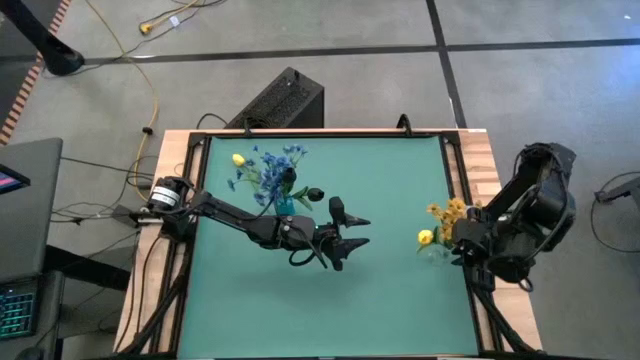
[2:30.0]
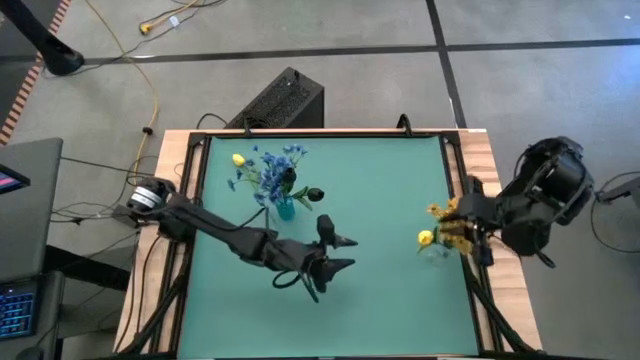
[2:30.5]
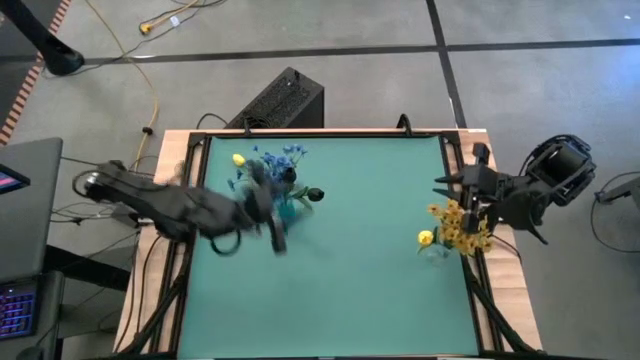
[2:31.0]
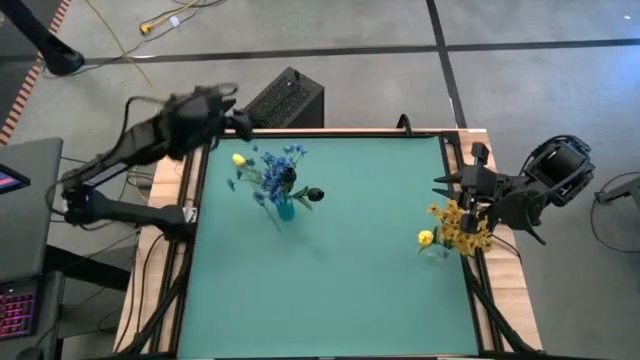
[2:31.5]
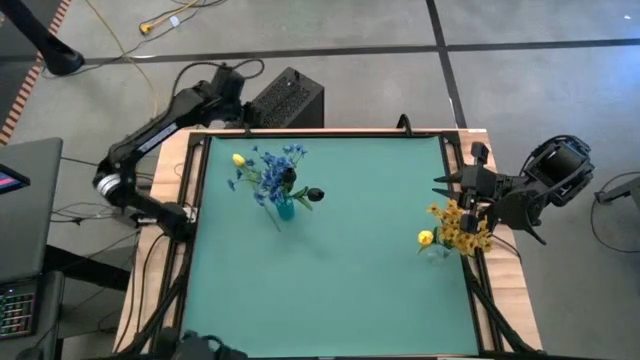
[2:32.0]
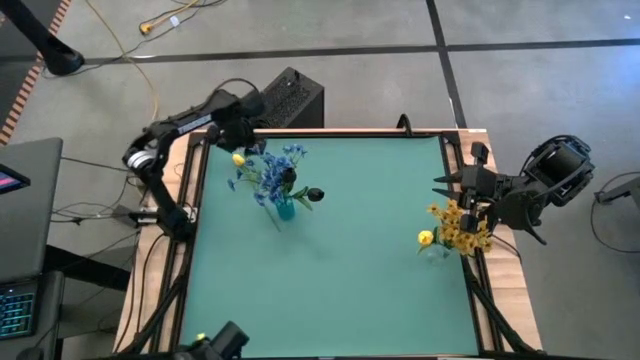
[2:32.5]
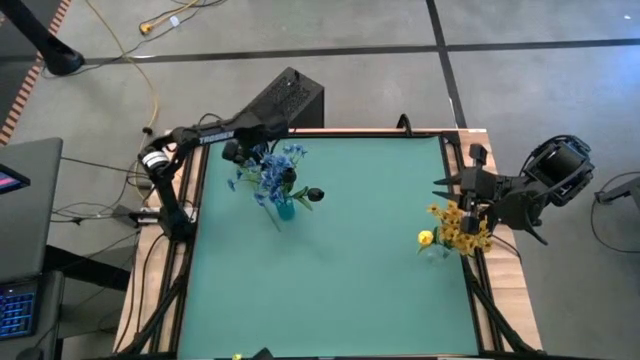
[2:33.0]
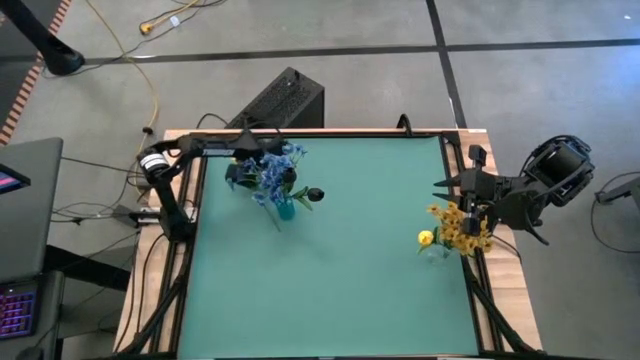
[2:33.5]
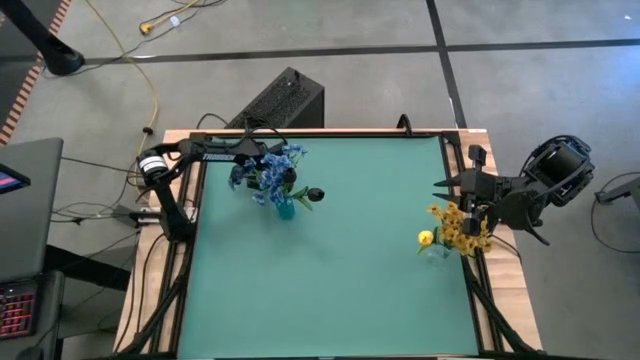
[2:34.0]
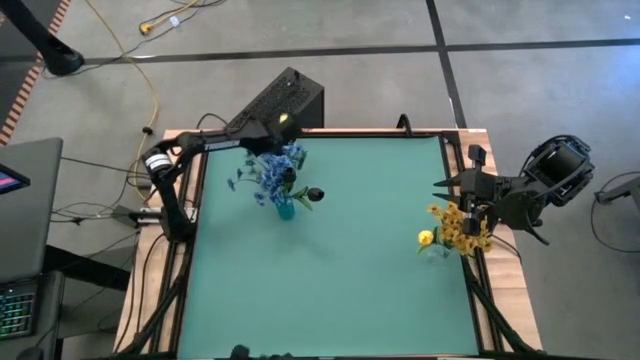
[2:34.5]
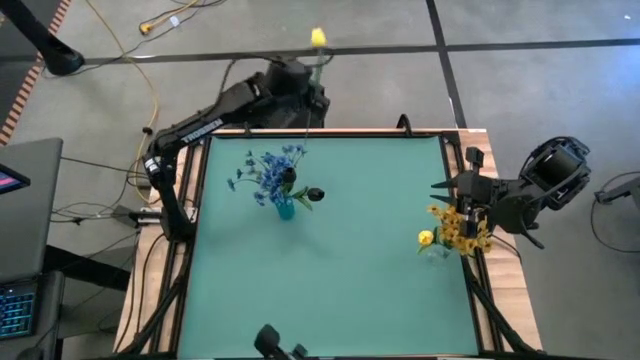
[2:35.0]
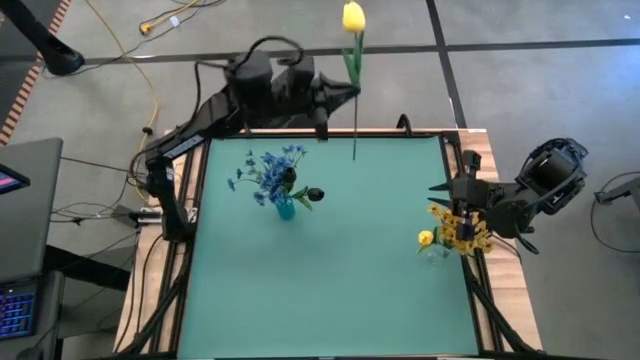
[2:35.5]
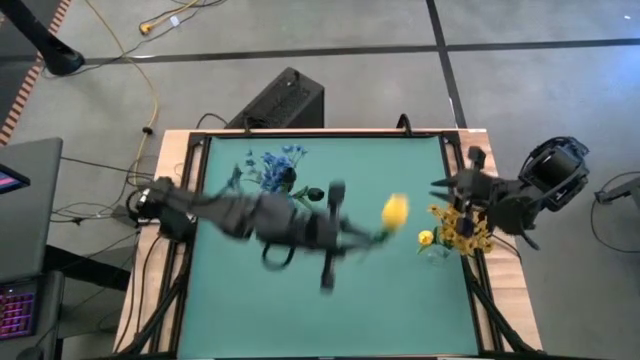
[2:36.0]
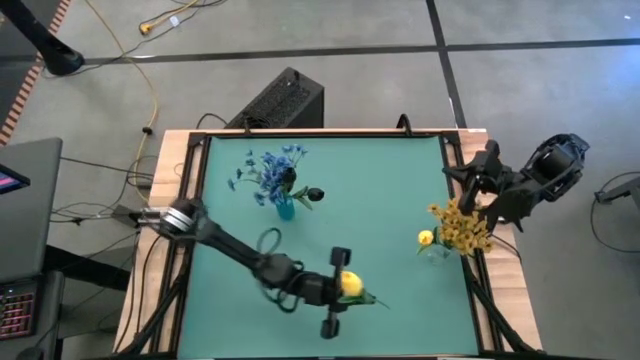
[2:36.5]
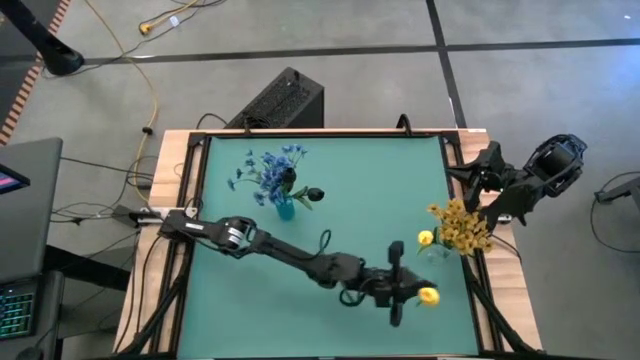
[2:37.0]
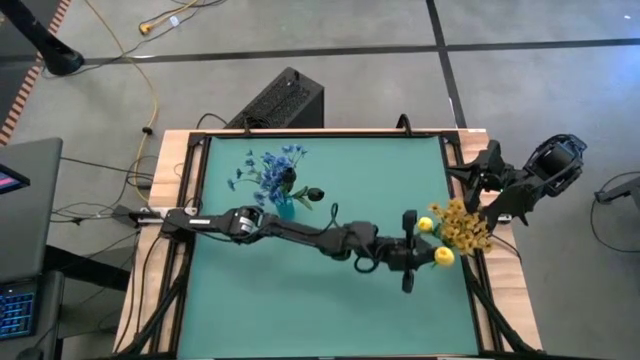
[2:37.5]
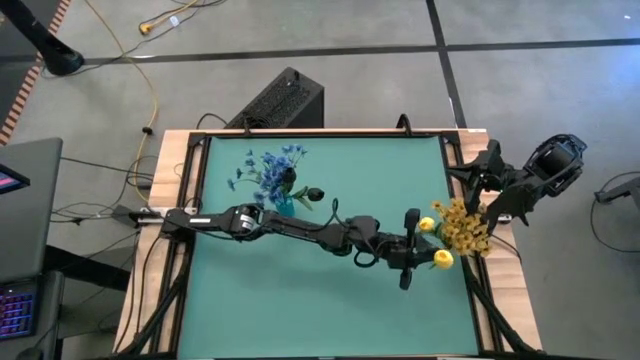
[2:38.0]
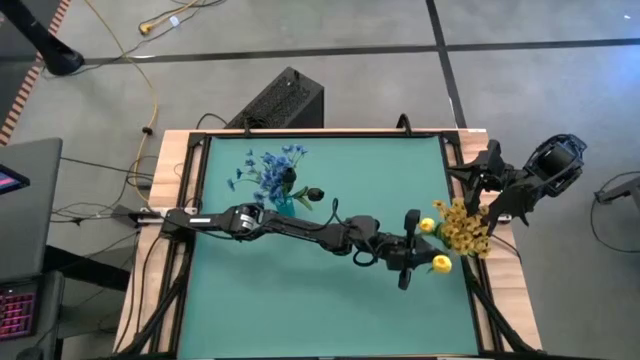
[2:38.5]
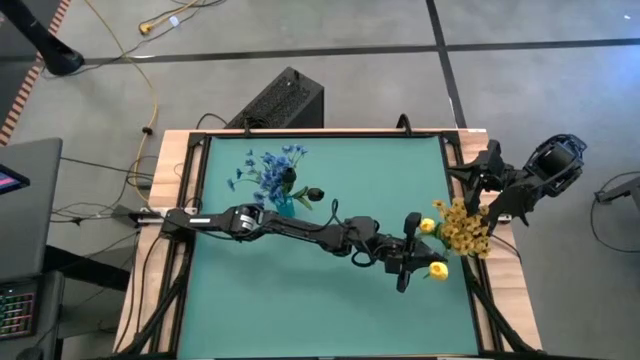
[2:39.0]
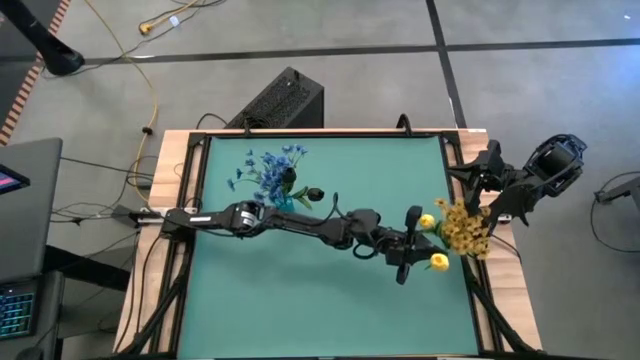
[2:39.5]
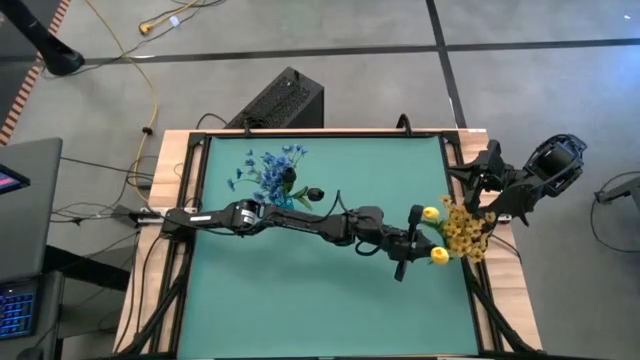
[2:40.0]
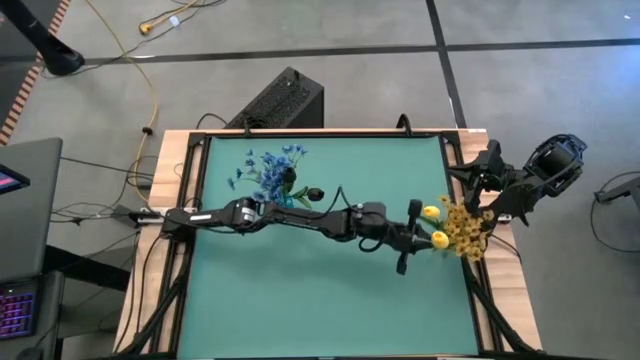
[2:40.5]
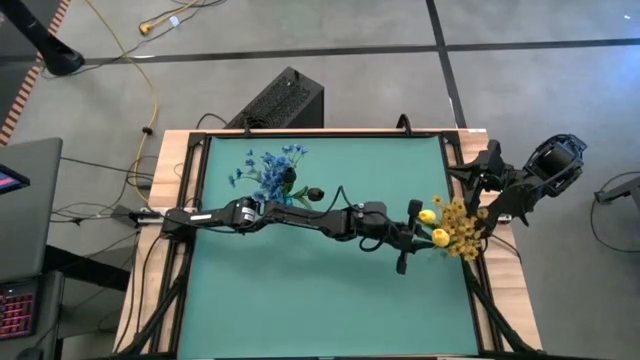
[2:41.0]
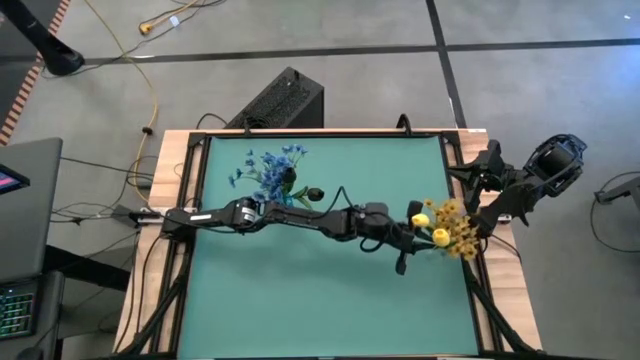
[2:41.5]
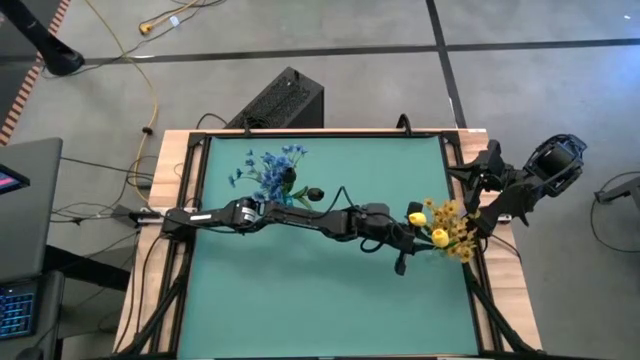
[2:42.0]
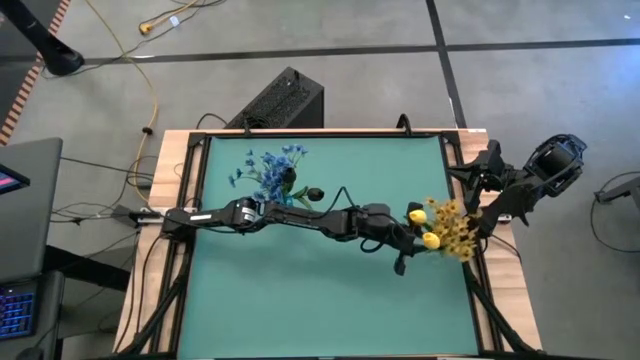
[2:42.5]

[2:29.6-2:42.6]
Task: Sort flowers into vase by color
Put the yellow flower into the transparent vase

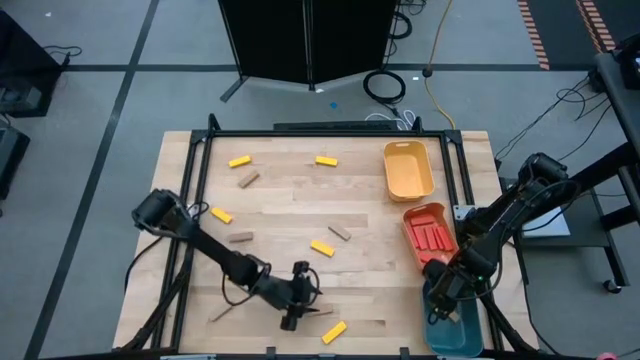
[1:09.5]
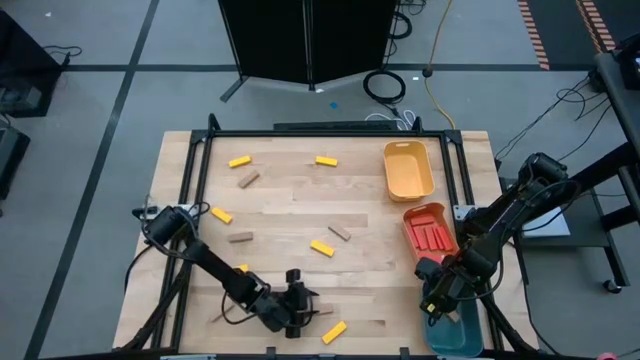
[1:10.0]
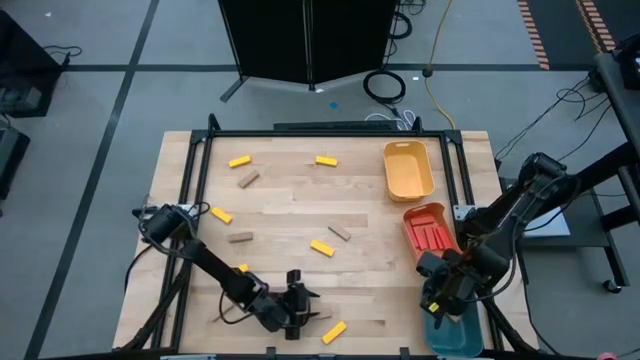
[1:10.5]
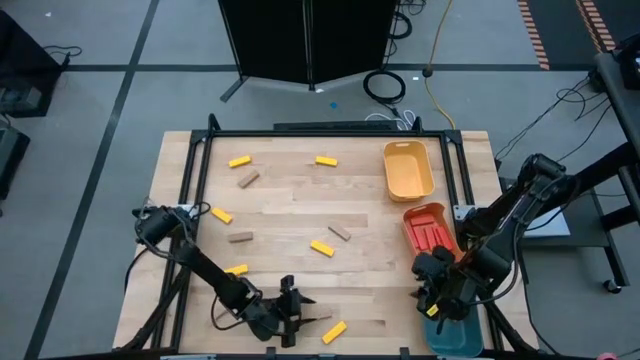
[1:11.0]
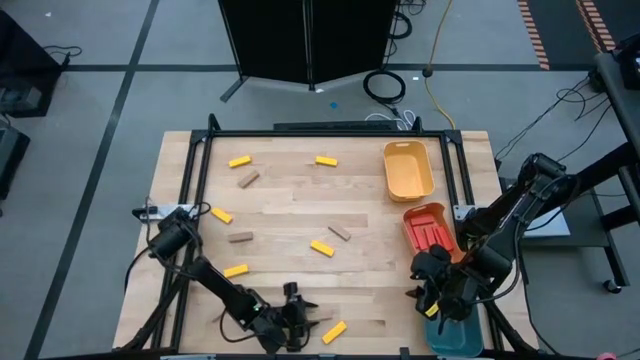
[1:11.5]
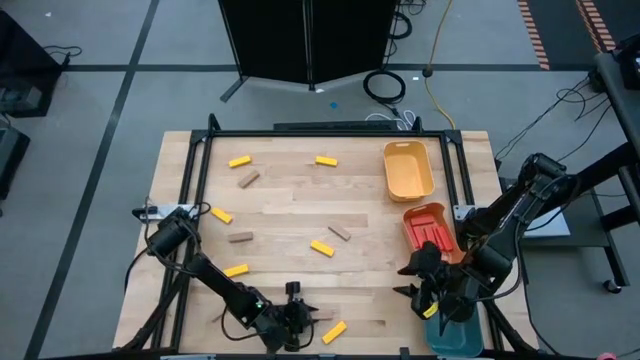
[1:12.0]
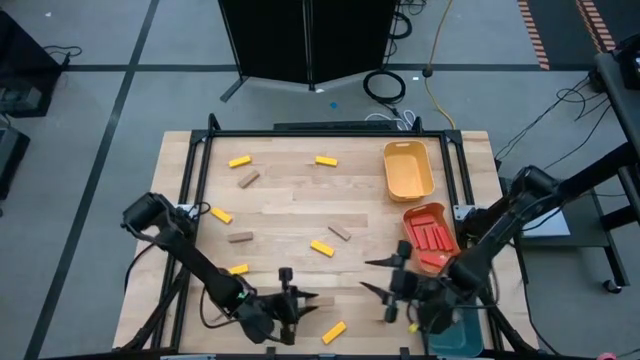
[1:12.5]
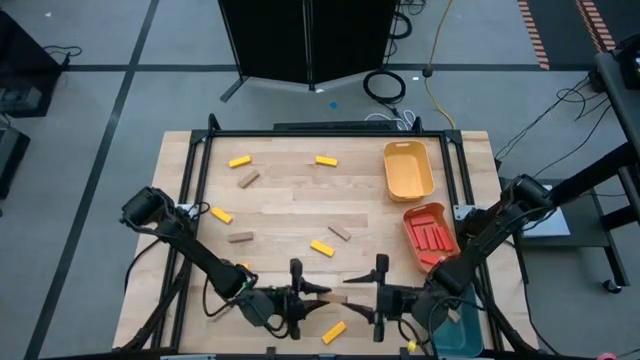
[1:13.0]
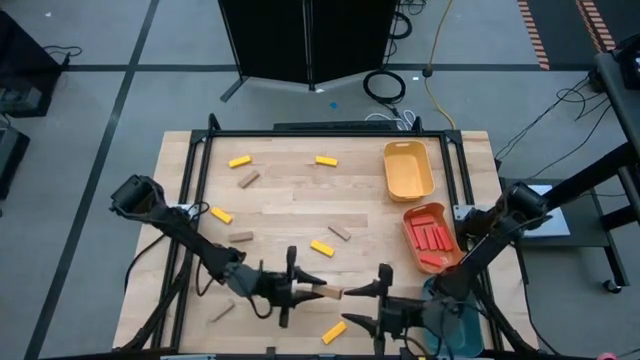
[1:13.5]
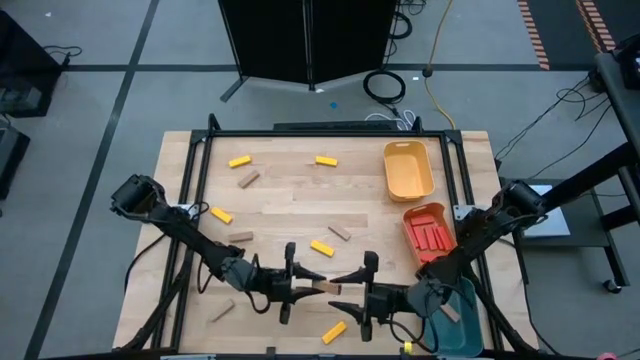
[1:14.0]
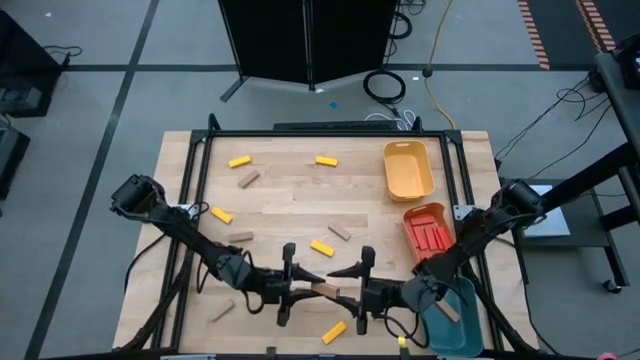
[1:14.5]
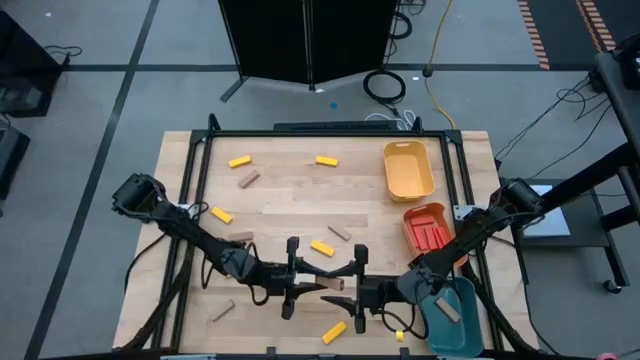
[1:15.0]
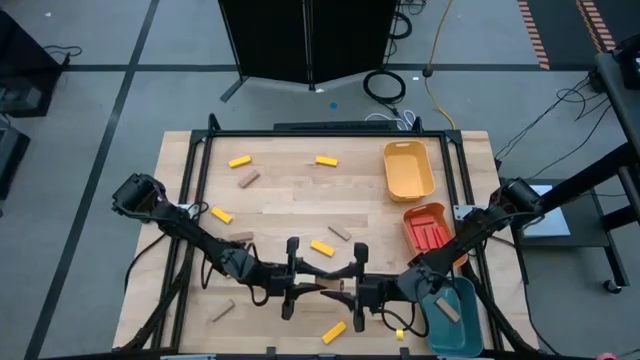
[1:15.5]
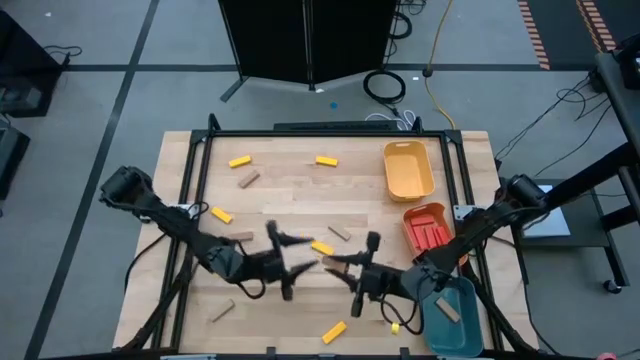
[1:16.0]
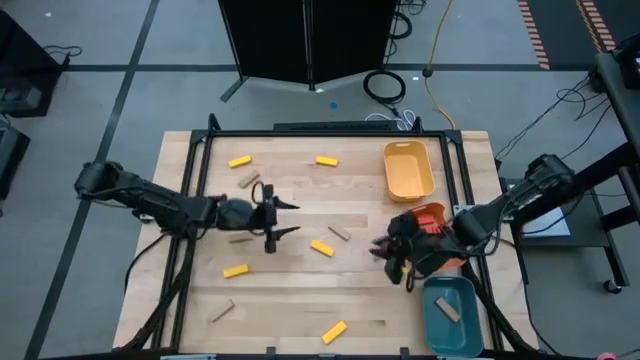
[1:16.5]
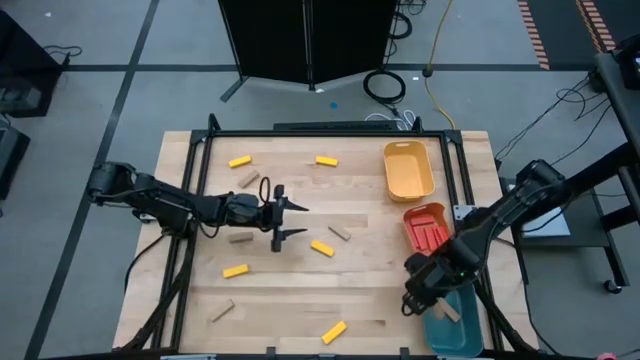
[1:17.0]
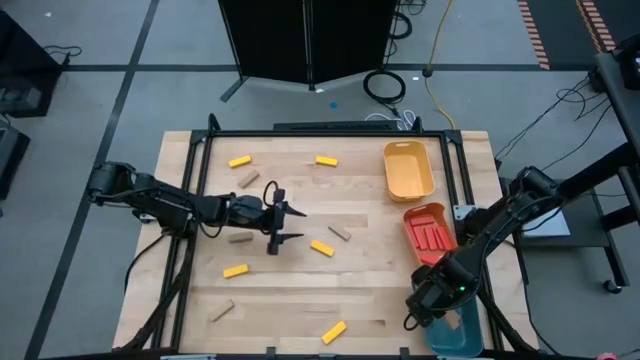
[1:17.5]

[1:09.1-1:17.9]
Task: Sort blocks
Put the brown block into the blue bin
